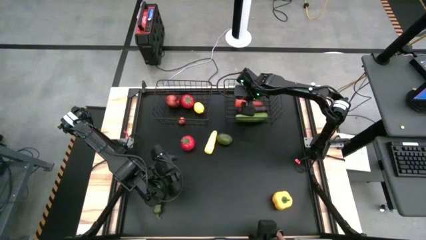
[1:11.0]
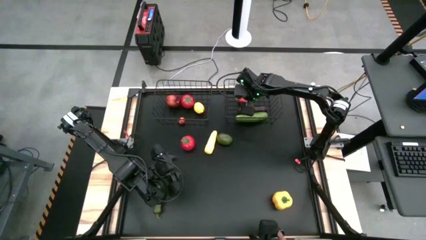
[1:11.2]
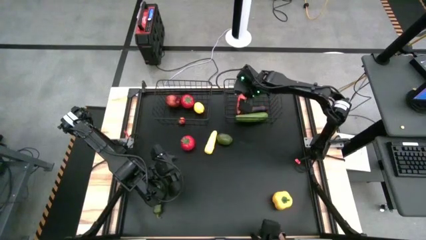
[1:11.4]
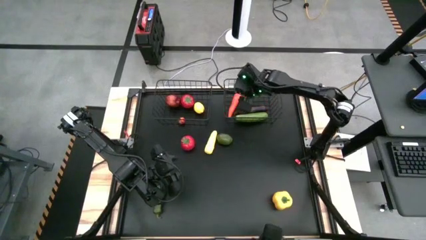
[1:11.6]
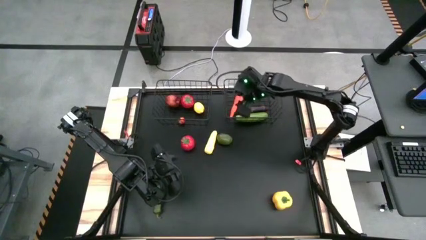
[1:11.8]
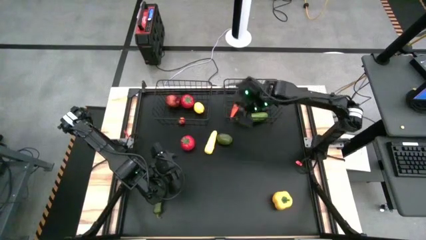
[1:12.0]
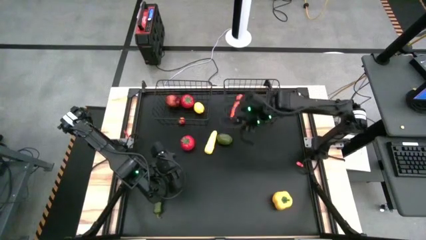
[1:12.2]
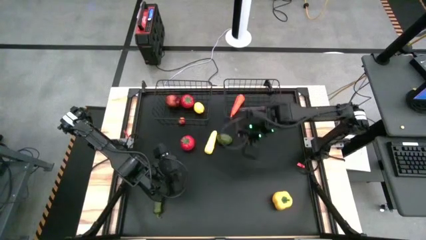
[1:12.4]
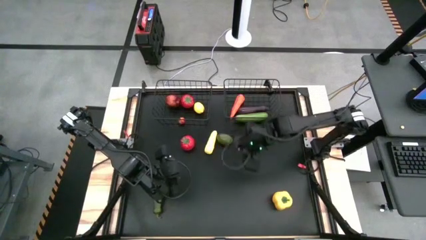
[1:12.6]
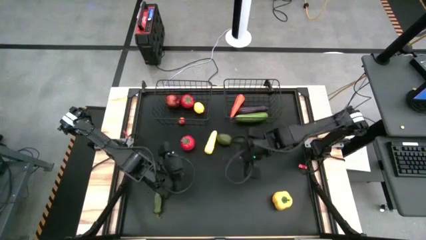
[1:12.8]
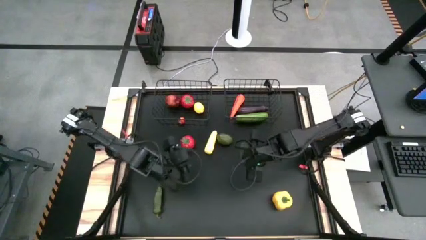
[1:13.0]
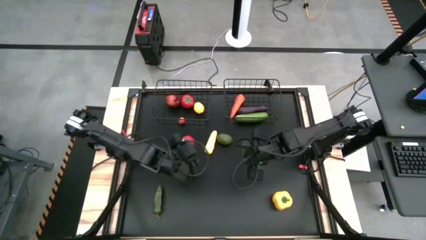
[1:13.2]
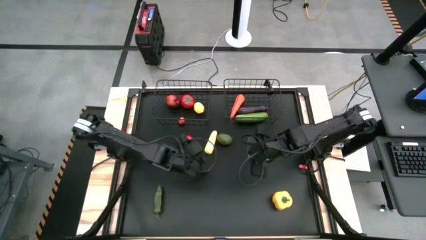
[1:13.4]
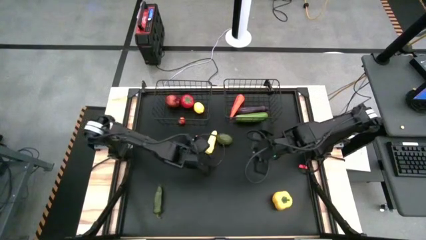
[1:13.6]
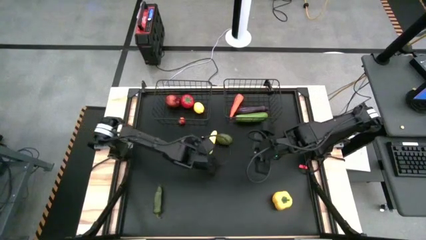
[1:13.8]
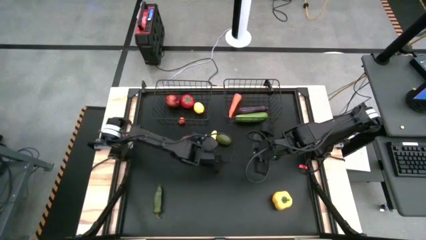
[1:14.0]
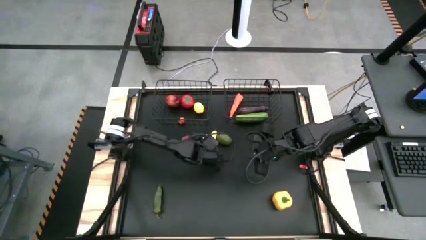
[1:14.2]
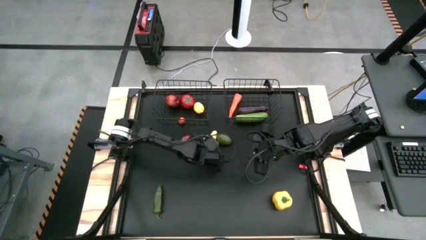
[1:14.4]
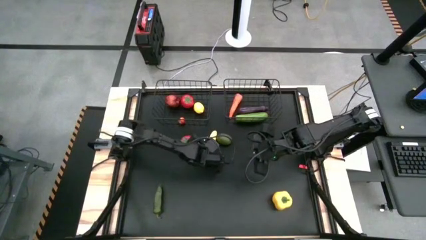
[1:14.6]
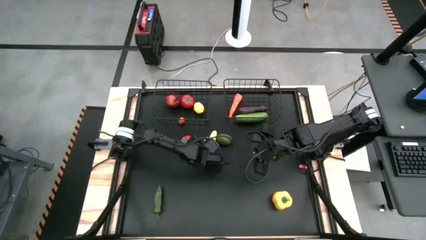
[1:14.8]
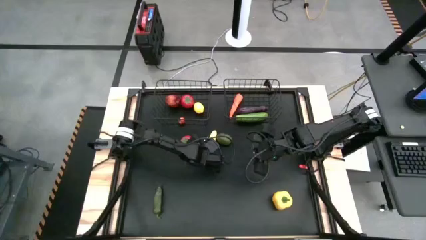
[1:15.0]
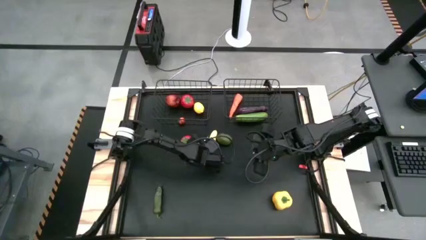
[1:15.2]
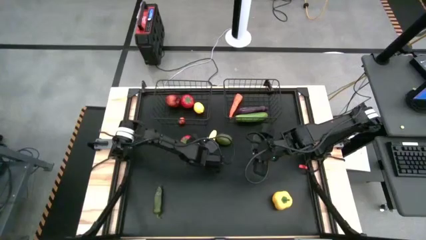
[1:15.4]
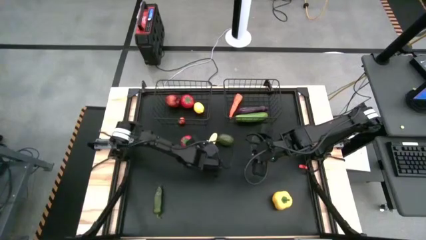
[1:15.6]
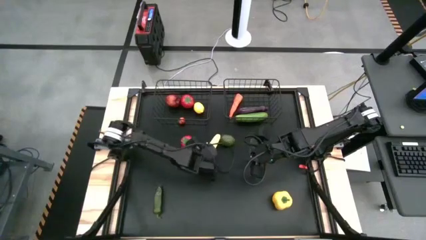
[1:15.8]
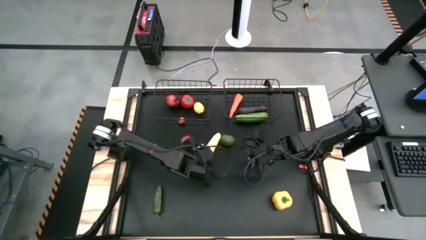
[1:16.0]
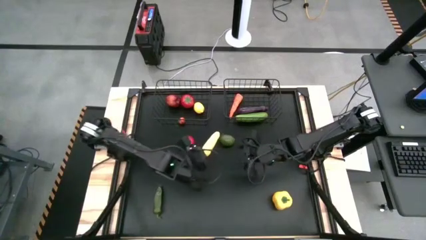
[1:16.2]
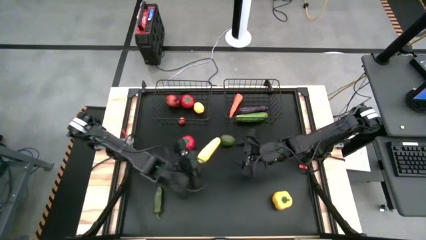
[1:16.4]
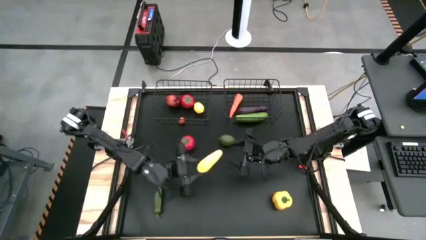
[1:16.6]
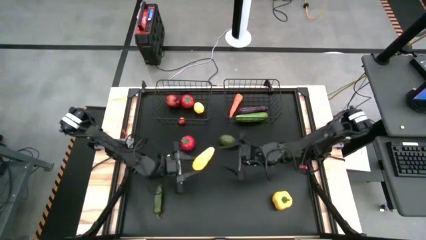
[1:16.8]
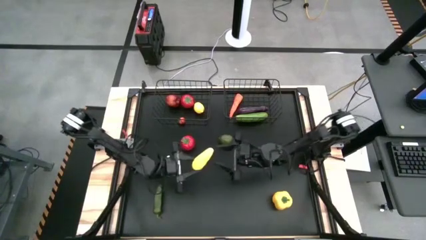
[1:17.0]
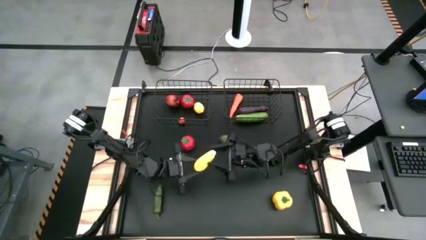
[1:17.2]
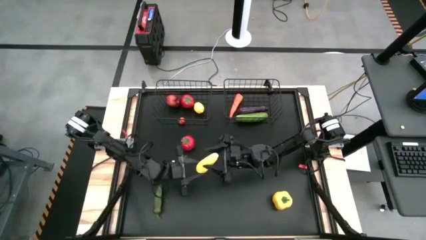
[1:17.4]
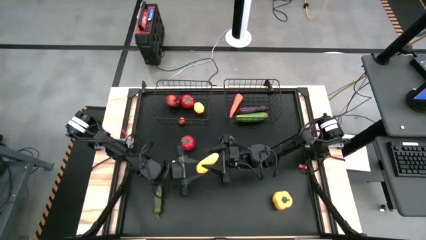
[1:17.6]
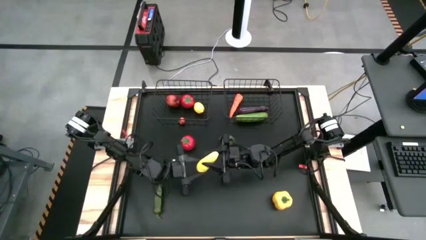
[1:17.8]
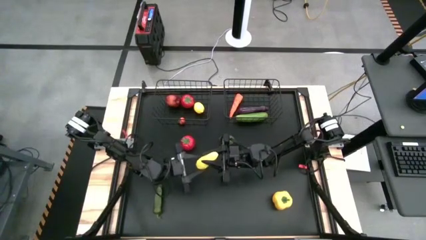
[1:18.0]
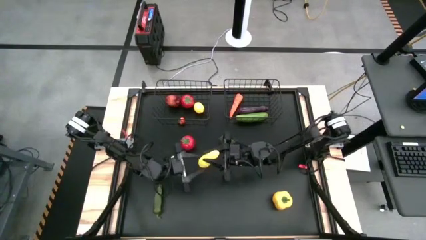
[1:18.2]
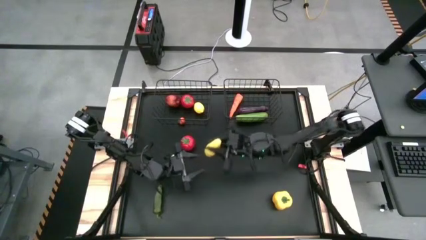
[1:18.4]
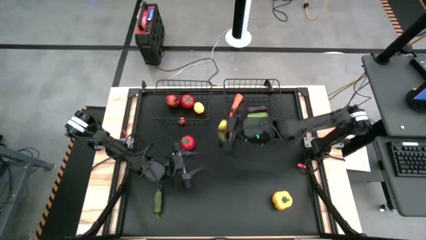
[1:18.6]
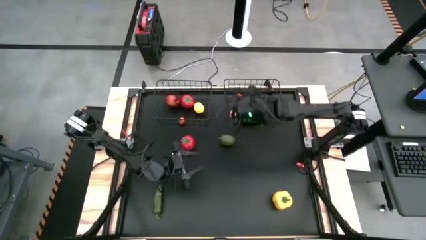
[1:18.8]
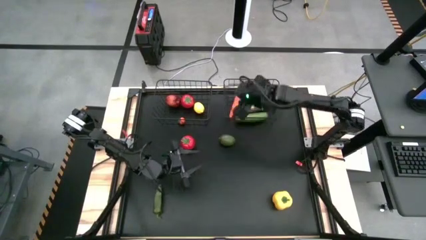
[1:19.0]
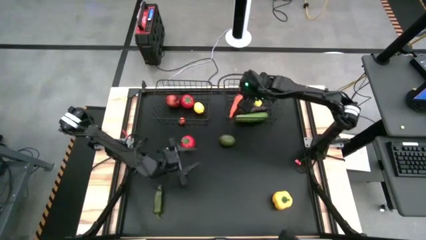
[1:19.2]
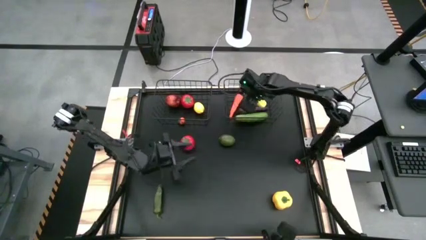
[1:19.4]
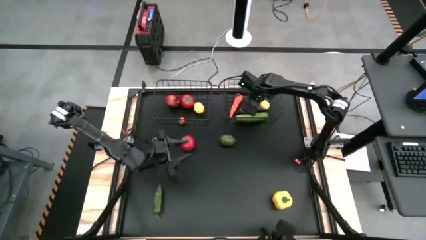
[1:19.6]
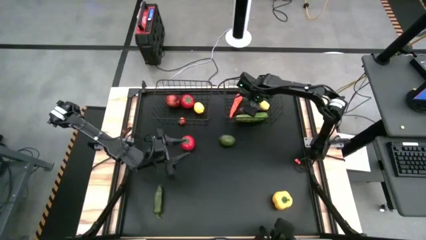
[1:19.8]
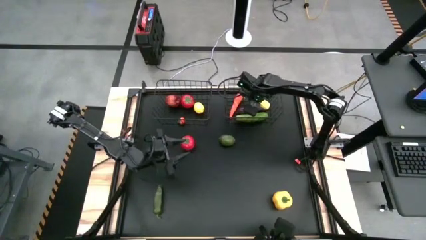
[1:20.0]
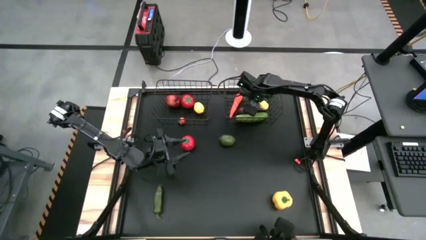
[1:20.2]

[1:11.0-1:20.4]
Task: Sort produce into baskets
Put the corn into the right wire basket

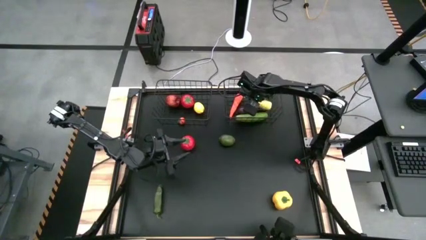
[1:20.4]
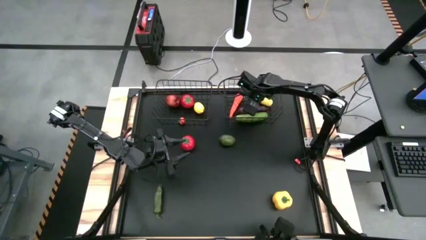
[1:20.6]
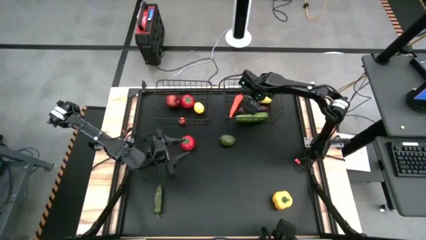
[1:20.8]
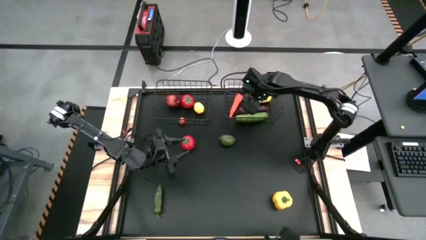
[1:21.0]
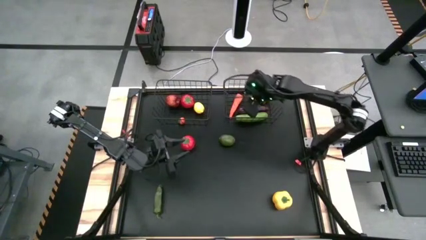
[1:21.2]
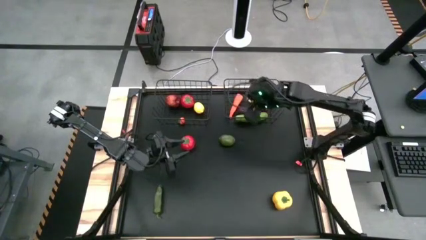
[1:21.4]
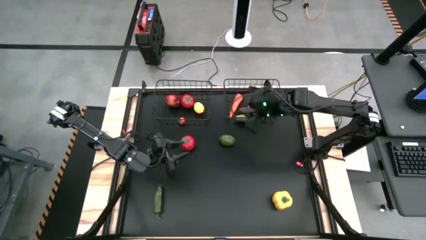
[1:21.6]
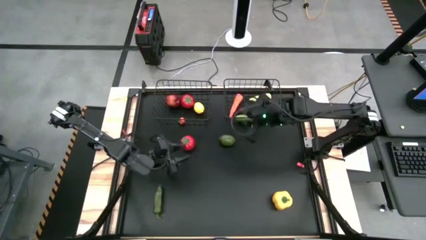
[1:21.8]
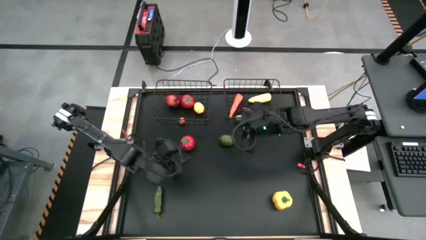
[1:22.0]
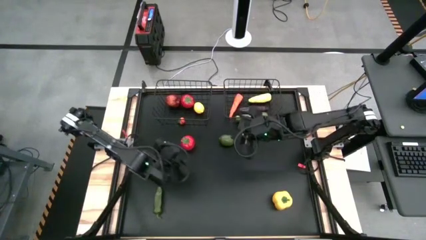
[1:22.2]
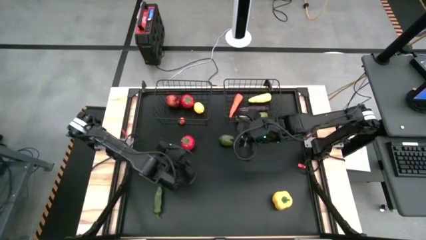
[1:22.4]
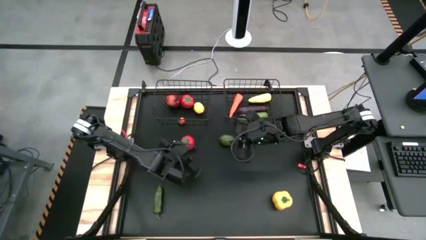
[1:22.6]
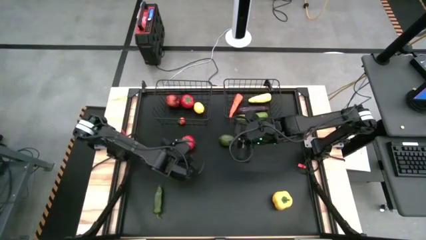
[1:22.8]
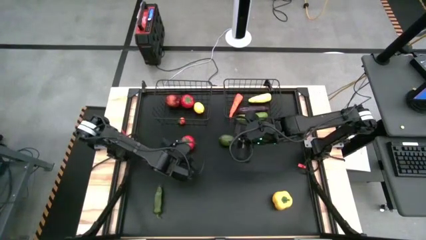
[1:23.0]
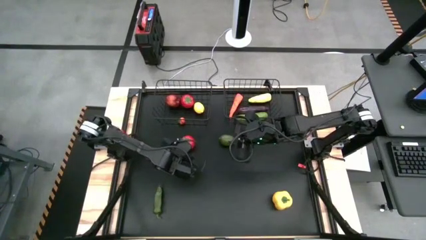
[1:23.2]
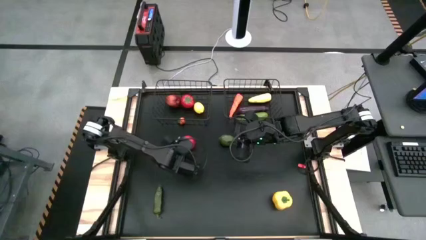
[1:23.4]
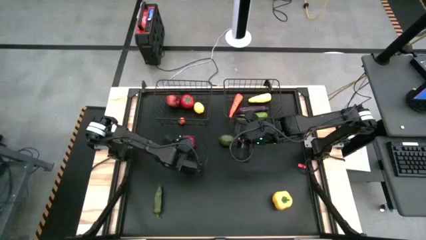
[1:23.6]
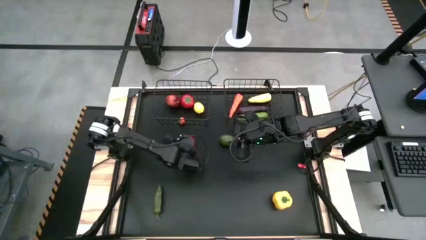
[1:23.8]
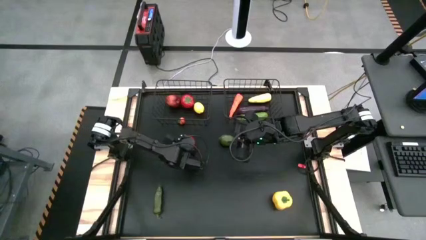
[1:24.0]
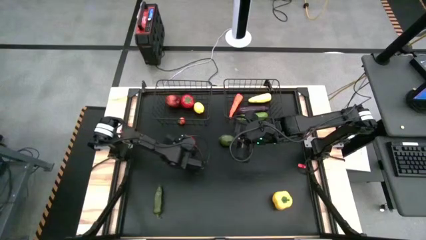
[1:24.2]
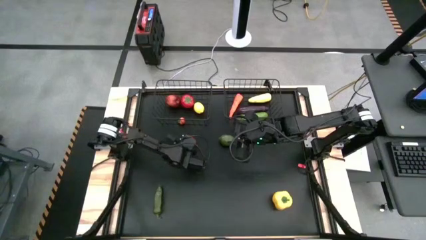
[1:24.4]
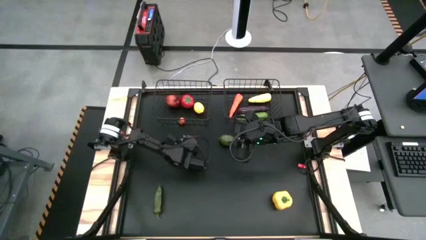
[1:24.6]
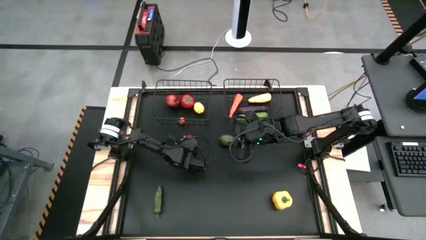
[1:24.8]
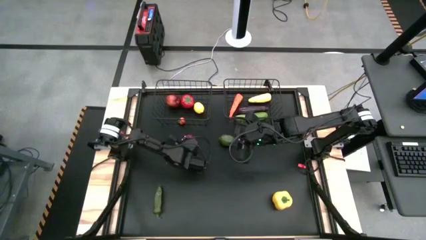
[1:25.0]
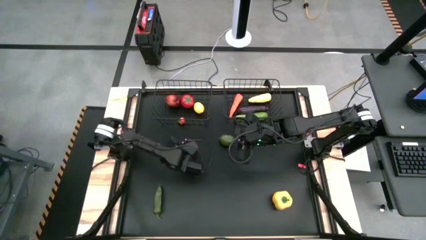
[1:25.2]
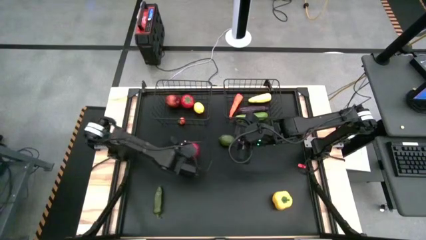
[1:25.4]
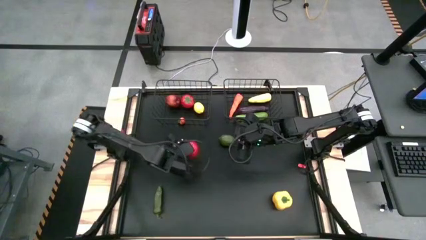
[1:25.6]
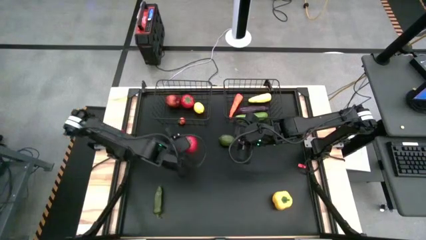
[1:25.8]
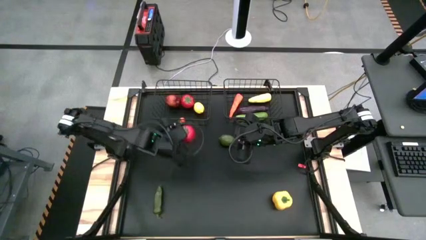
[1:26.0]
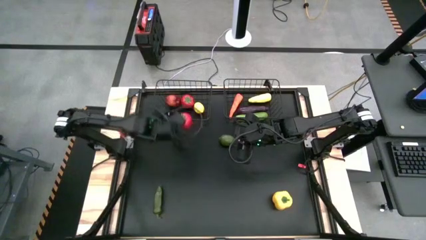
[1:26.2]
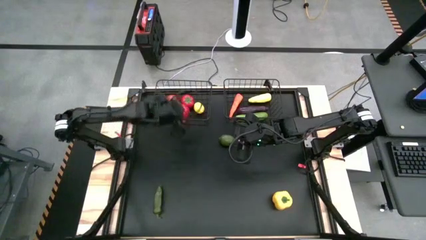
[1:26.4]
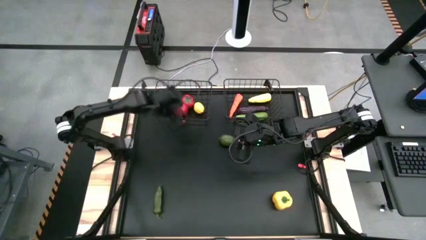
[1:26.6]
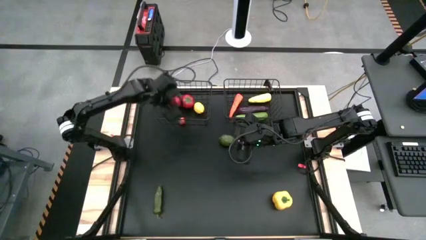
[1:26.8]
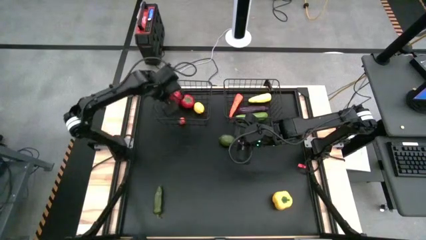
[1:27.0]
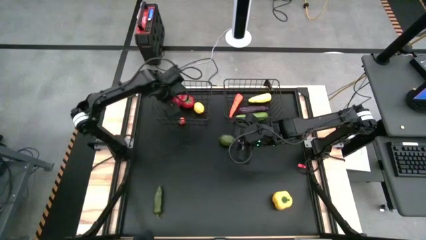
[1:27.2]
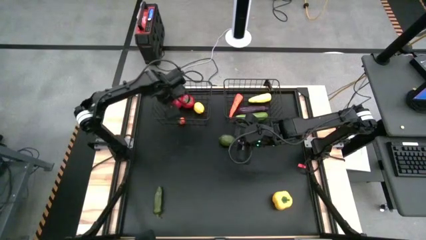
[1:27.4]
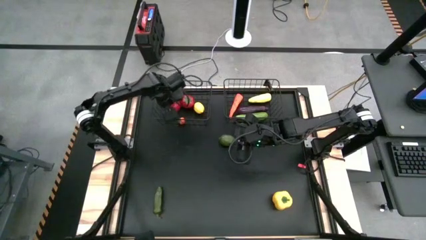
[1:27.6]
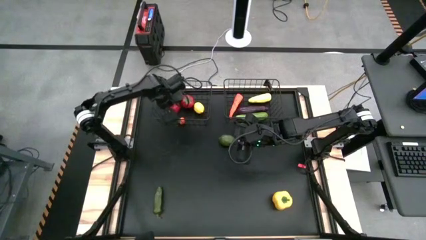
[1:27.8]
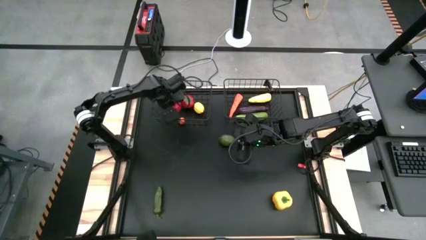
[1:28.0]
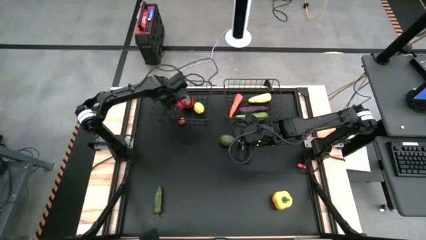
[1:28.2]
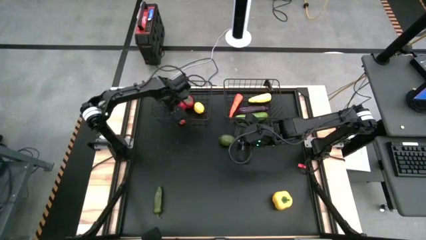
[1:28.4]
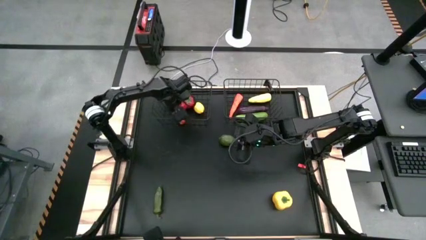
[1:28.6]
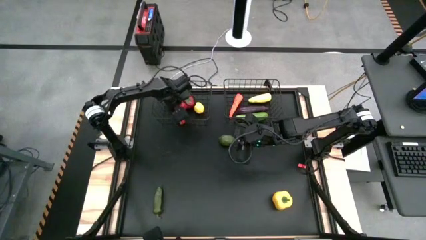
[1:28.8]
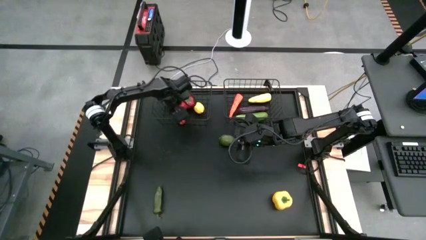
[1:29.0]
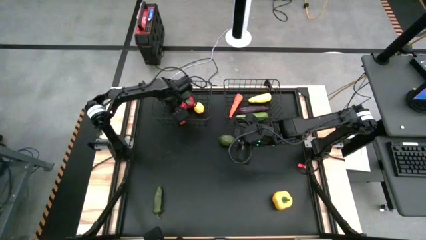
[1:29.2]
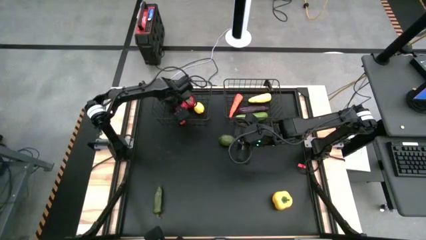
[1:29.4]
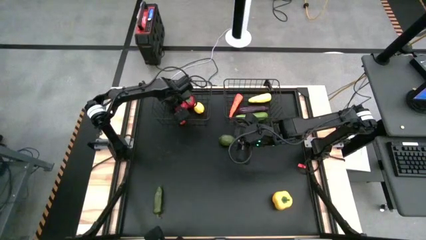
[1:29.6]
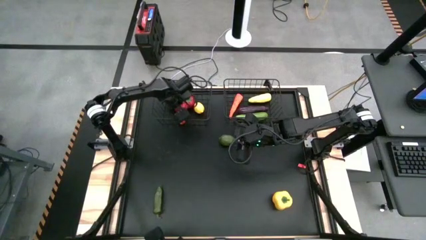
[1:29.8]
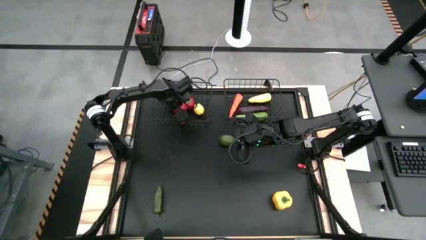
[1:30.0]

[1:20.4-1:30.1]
Put the tomato into the left wire basket
